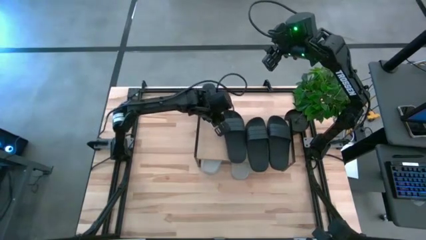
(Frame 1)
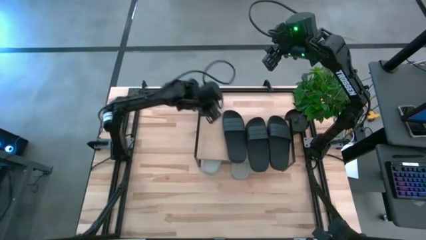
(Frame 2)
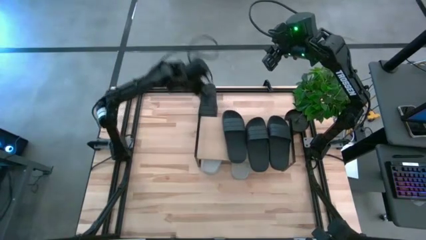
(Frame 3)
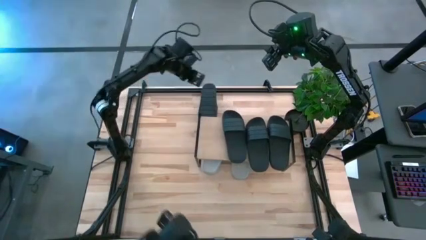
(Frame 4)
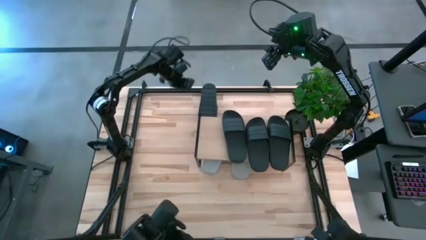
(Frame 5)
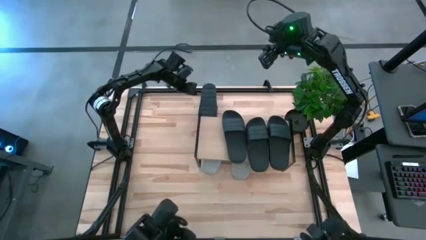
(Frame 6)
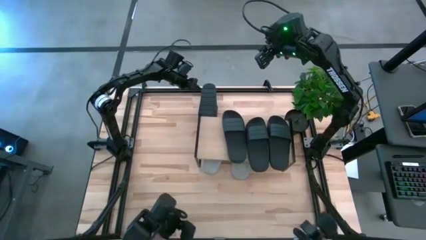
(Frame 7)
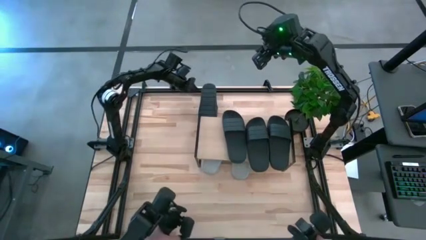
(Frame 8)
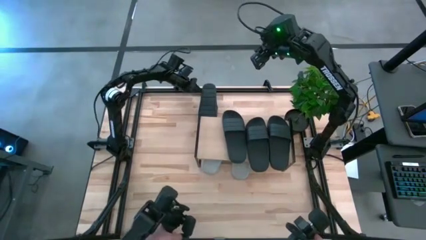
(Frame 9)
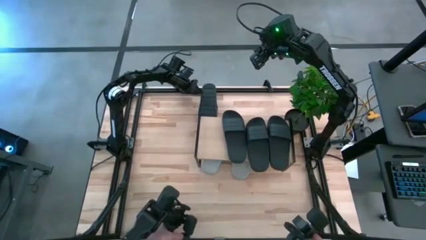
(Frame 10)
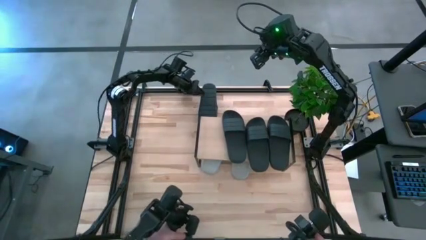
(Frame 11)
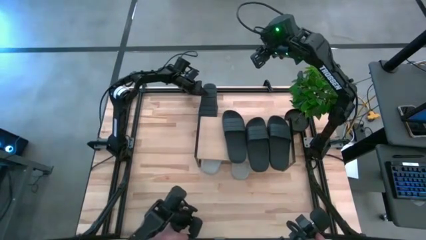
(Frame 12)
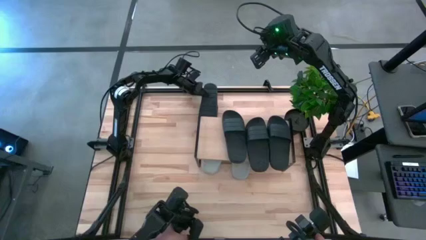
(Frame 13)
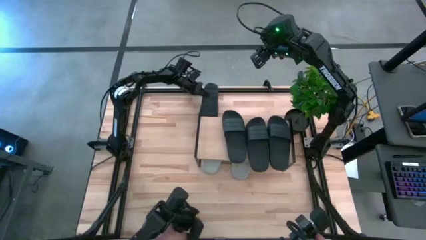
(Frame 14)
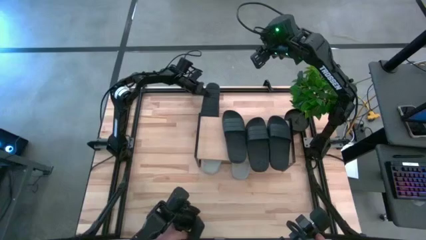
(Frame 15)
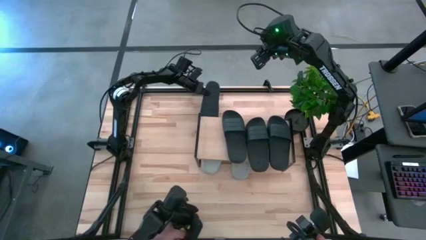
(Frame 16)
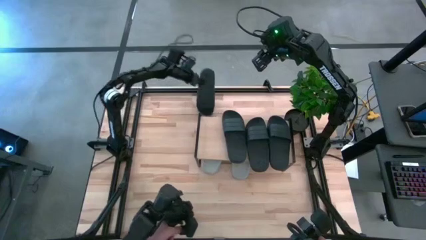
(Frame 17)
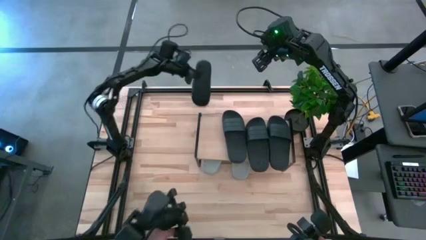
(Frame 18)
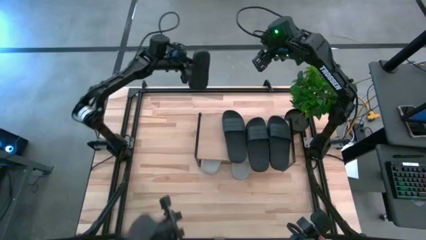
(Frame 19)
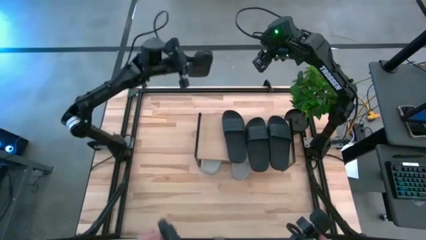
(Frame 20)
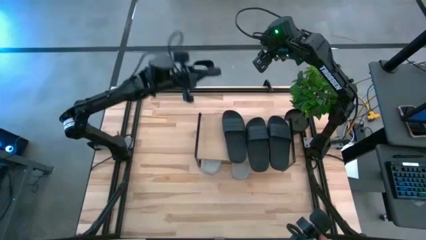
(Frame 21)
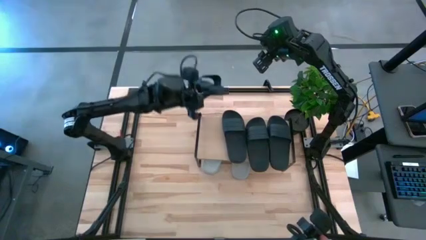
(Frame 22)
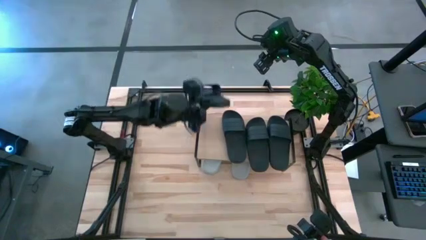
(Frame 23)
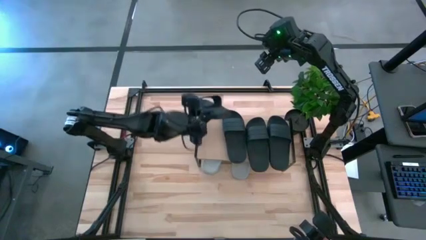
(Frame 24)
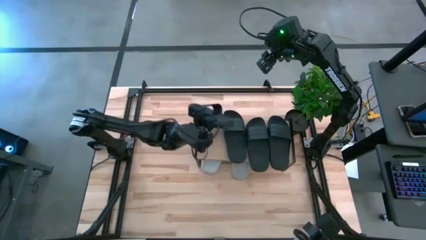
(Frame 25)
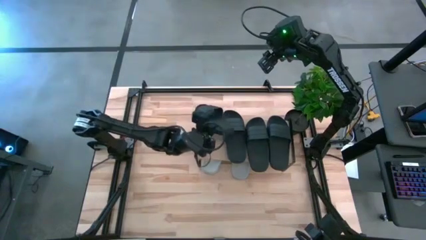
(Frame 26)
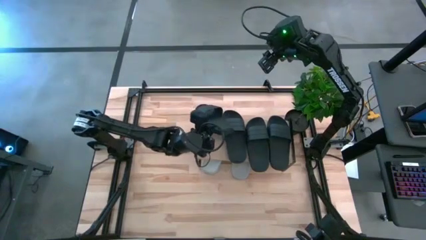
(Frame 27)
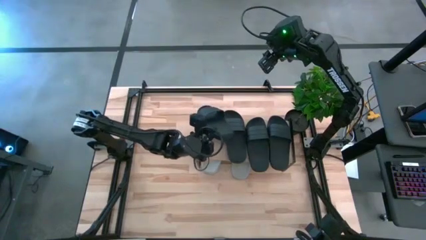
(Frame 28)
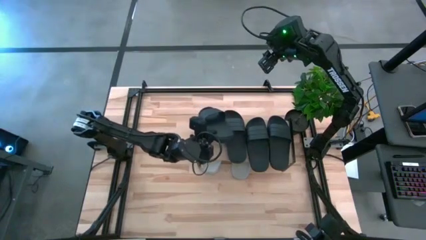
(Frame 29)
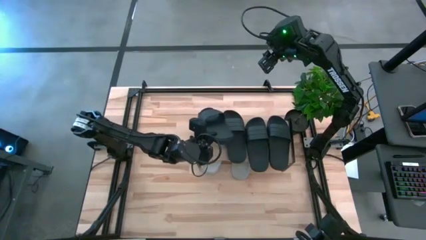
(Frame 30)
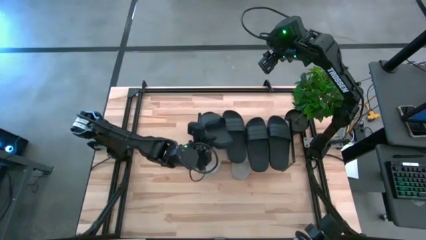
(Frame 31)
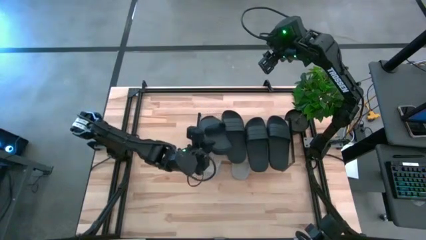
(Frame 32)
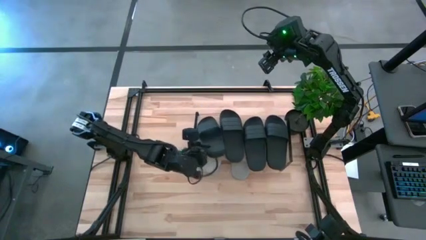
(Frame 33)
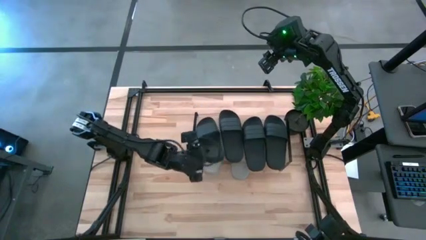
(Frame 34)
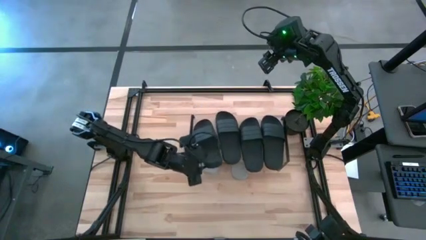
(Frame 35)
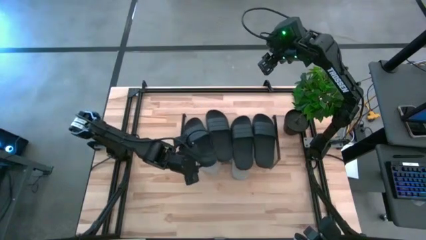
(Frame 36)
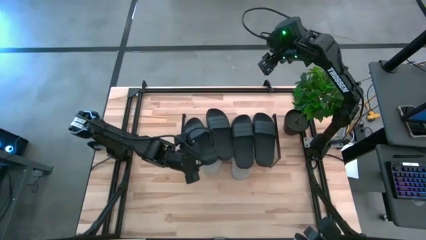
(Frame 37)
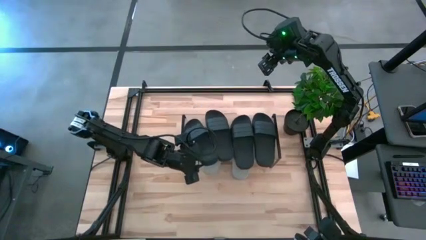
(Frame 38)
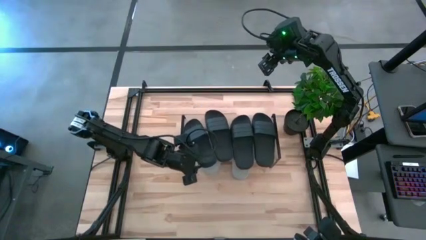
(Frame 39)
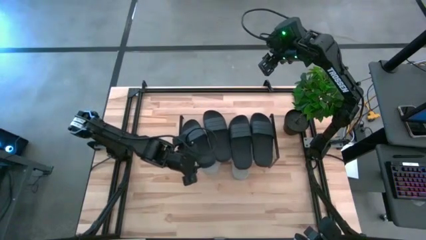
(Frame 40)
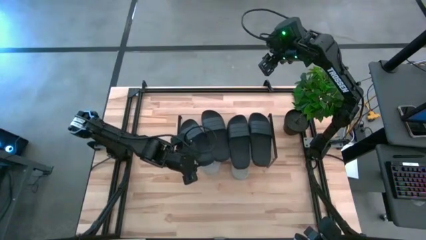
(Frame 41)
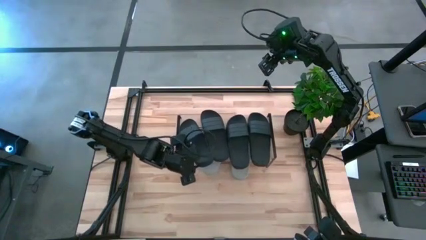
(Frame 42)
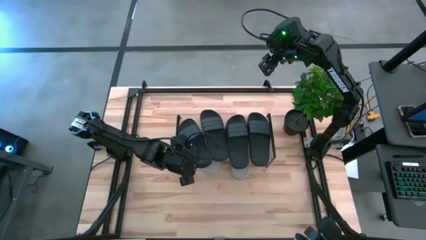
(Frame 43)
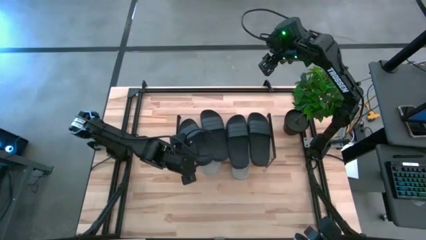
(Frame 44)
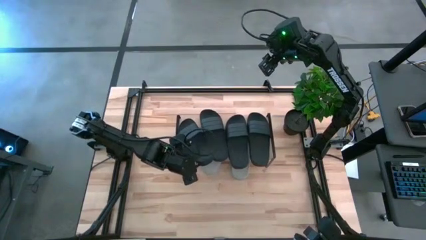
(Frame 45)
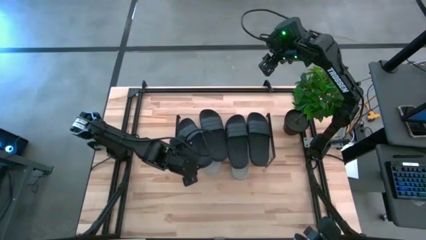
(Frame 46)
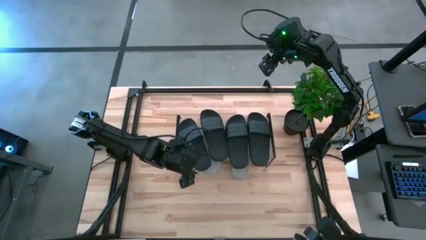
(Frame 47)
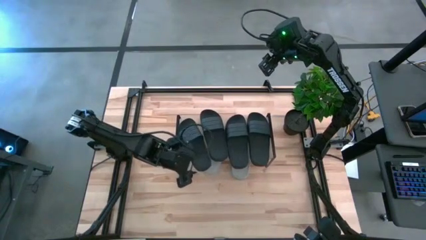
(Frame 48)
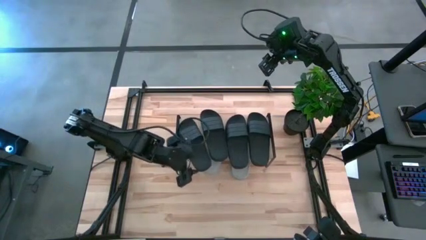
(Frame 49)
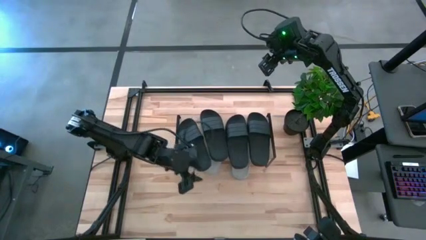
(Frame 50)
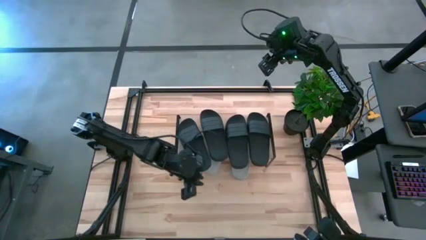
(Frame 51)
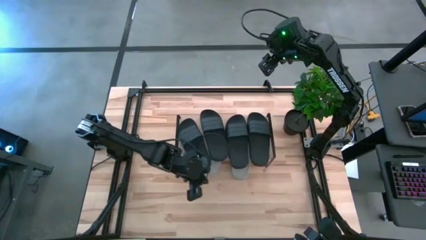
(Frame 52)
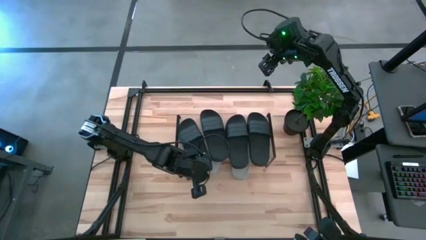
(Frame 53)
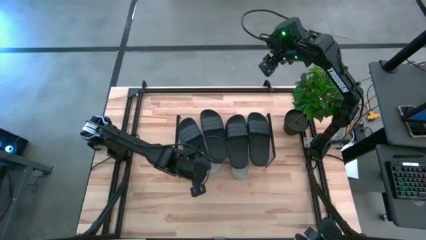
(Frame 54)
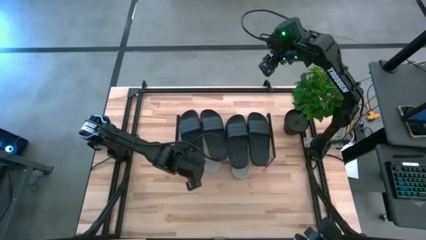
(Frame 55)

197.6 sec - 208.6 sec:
Task: Pick and place slides into the shelf
Put the black slipper on the shelf
